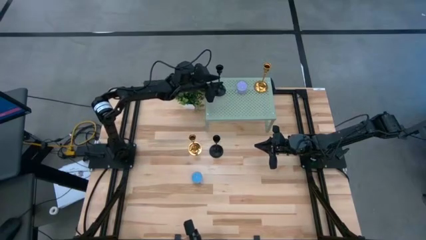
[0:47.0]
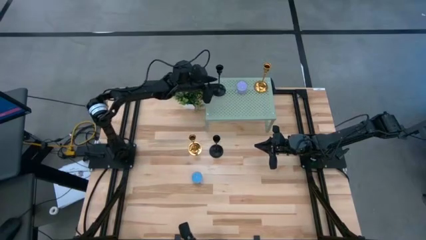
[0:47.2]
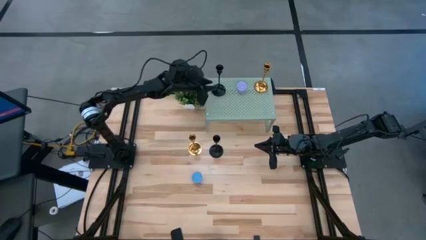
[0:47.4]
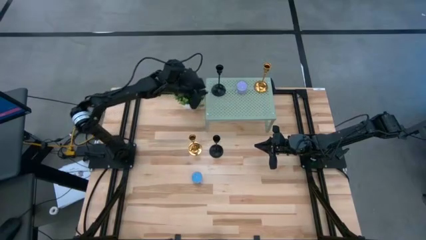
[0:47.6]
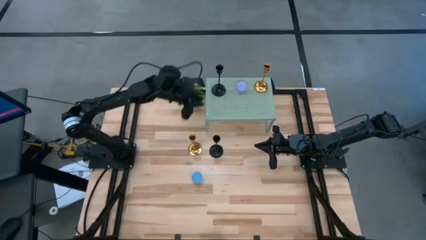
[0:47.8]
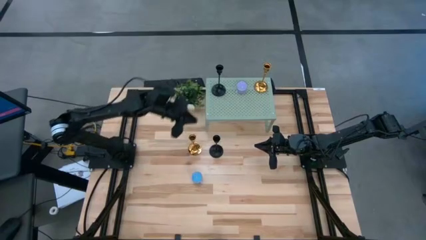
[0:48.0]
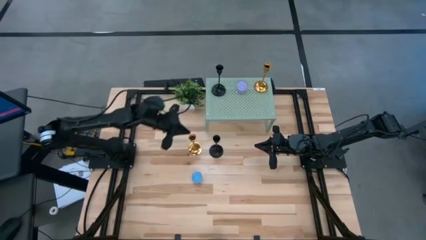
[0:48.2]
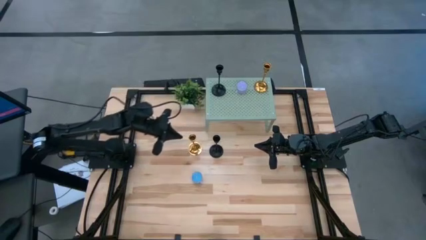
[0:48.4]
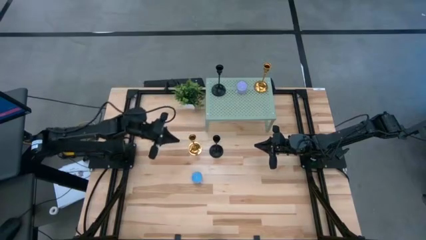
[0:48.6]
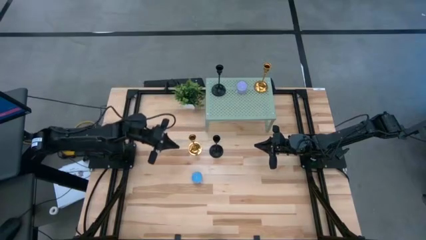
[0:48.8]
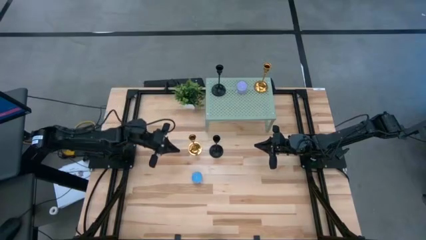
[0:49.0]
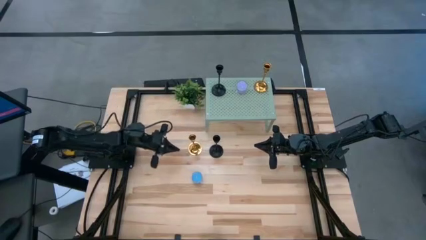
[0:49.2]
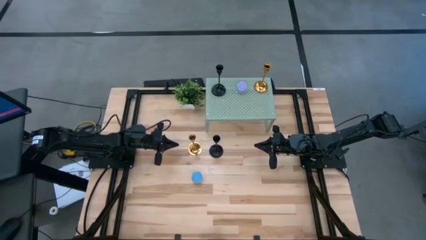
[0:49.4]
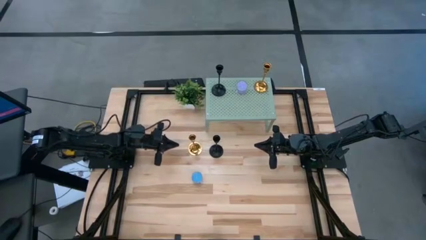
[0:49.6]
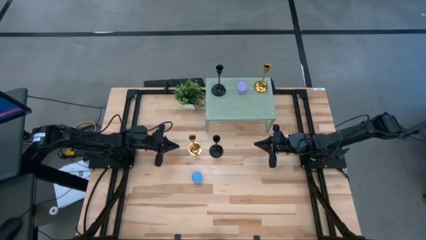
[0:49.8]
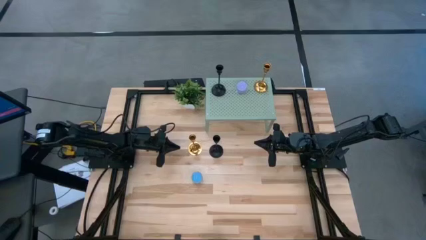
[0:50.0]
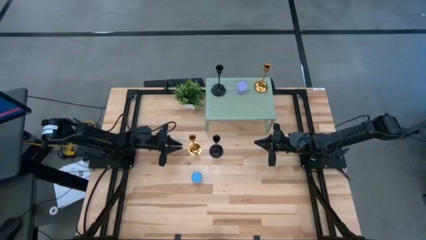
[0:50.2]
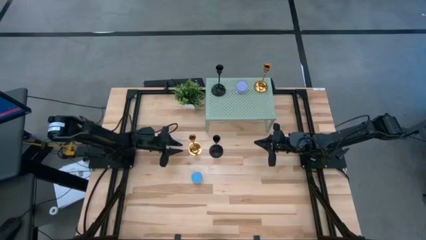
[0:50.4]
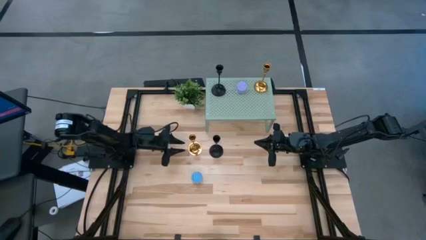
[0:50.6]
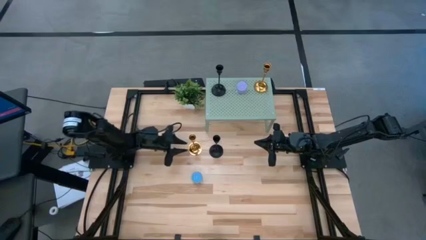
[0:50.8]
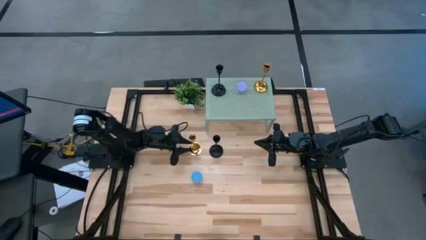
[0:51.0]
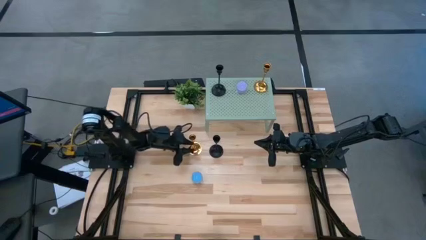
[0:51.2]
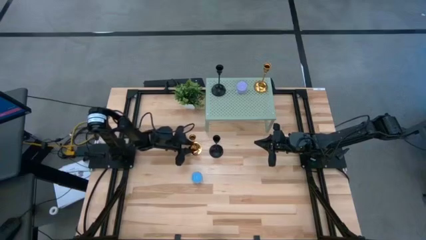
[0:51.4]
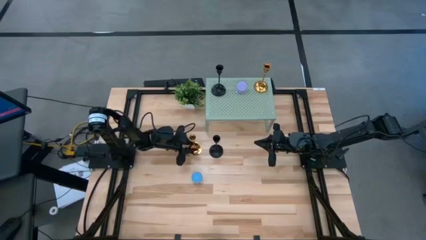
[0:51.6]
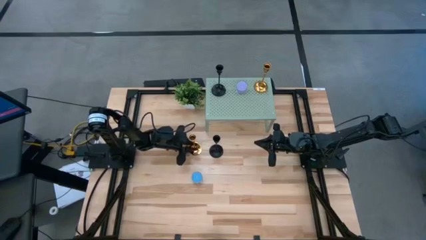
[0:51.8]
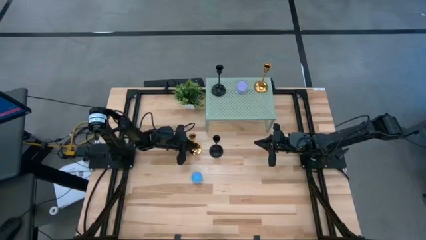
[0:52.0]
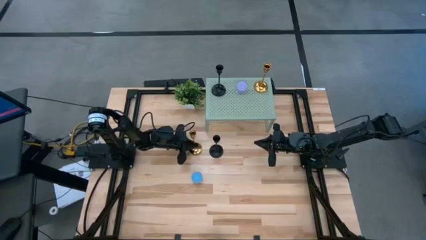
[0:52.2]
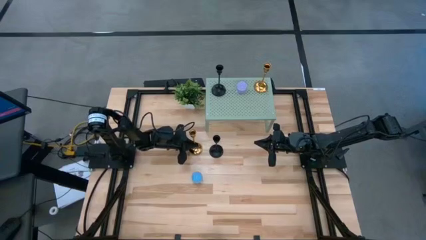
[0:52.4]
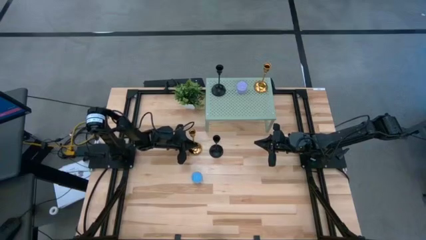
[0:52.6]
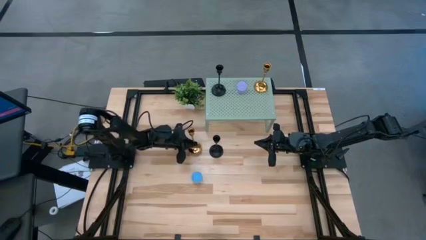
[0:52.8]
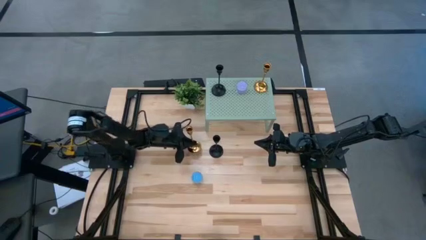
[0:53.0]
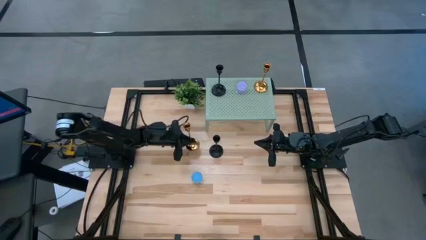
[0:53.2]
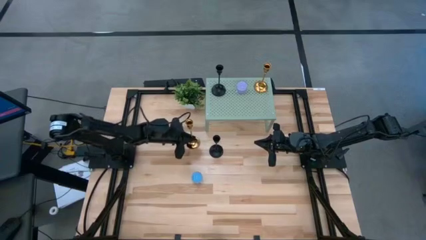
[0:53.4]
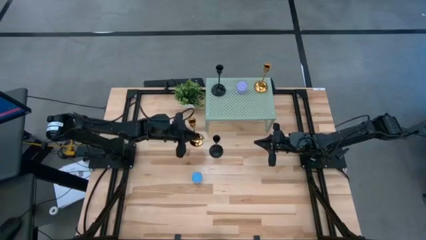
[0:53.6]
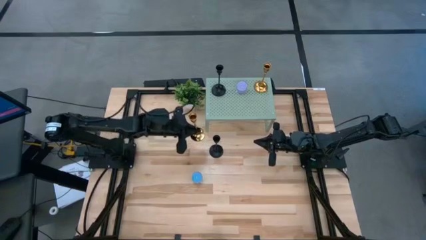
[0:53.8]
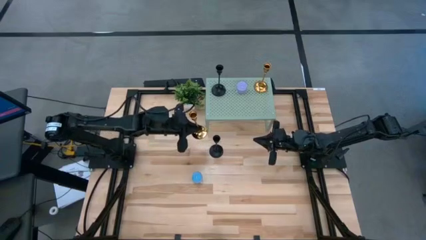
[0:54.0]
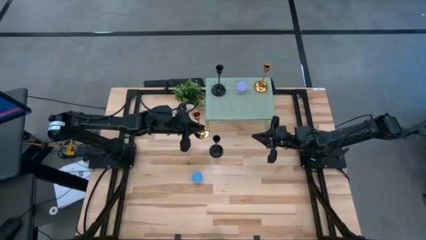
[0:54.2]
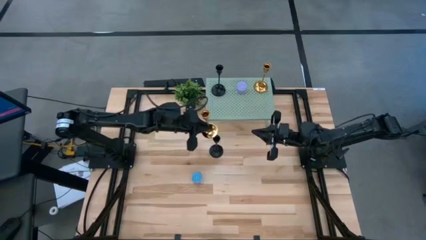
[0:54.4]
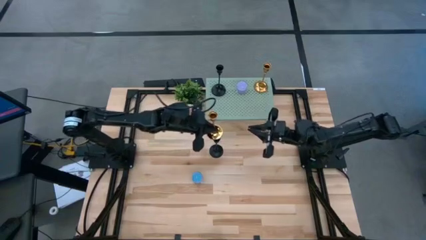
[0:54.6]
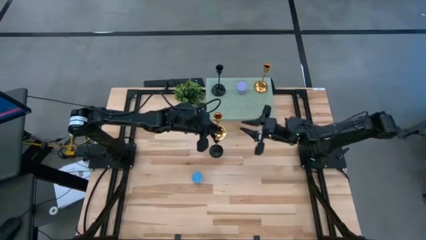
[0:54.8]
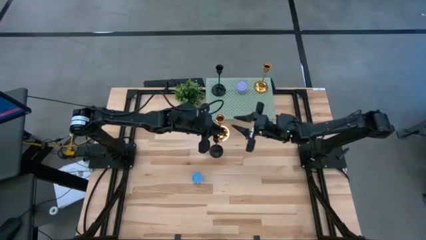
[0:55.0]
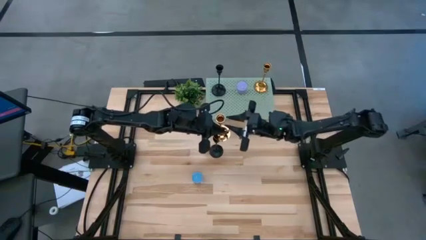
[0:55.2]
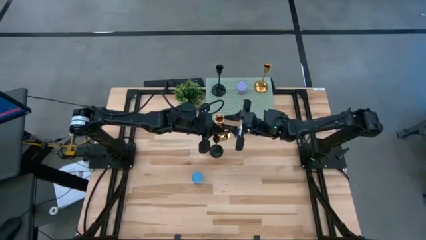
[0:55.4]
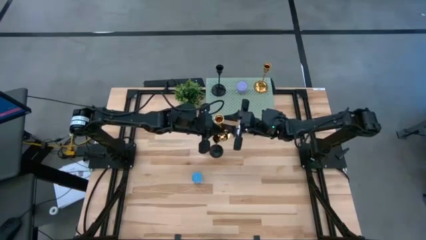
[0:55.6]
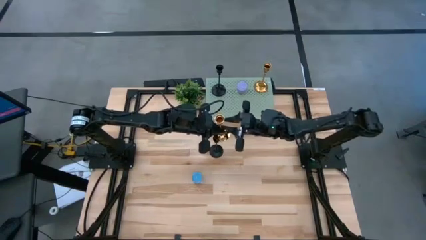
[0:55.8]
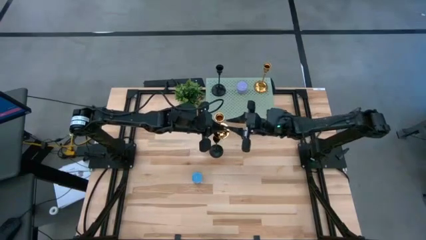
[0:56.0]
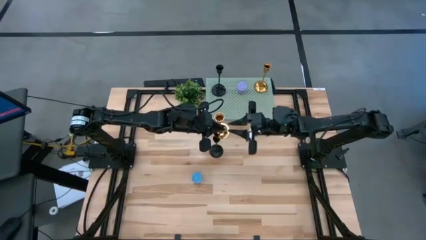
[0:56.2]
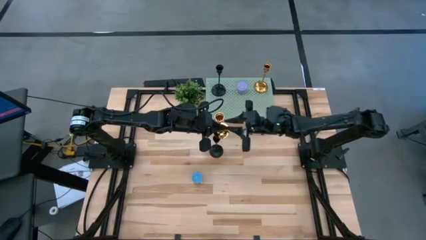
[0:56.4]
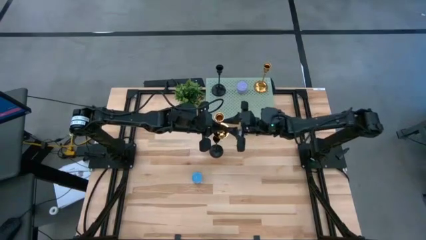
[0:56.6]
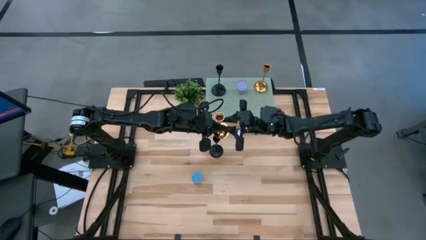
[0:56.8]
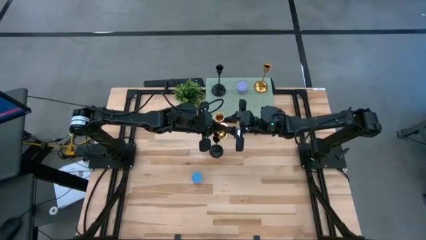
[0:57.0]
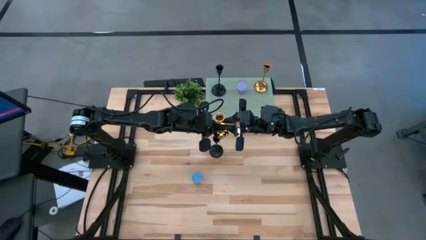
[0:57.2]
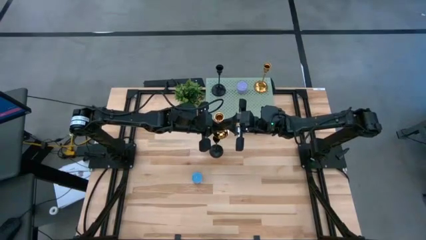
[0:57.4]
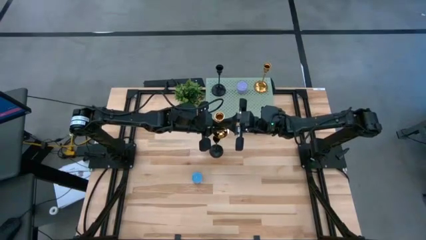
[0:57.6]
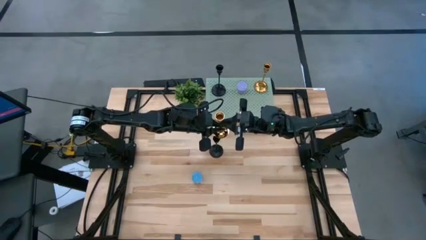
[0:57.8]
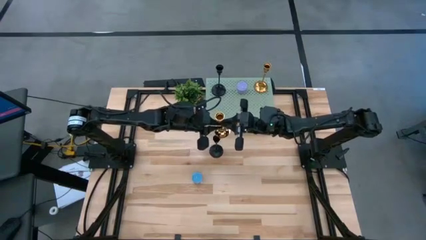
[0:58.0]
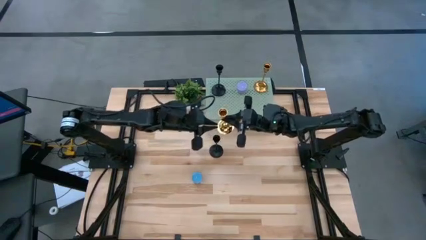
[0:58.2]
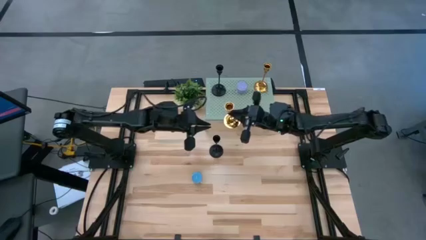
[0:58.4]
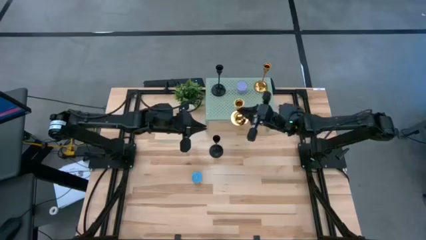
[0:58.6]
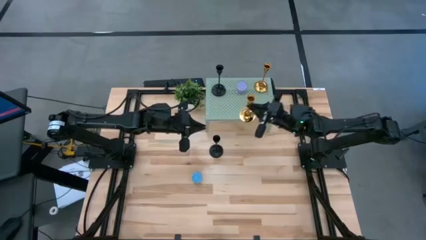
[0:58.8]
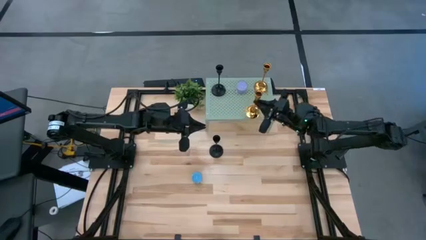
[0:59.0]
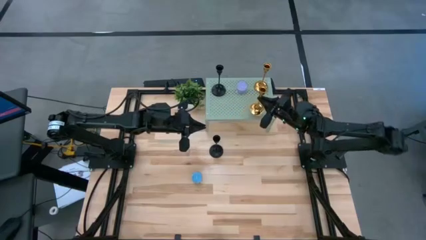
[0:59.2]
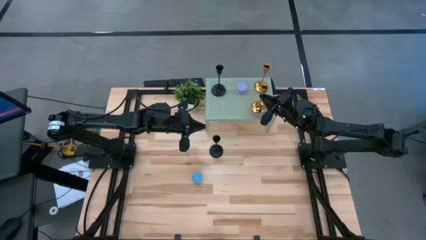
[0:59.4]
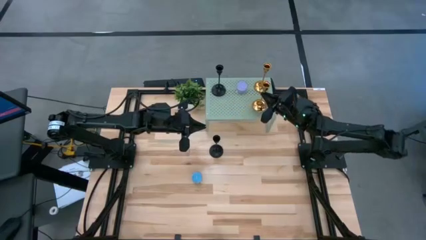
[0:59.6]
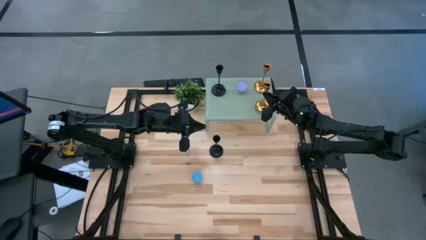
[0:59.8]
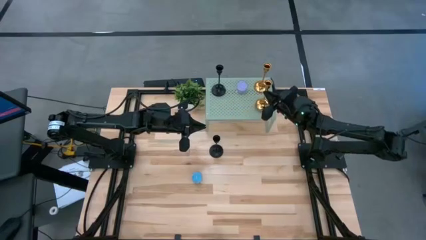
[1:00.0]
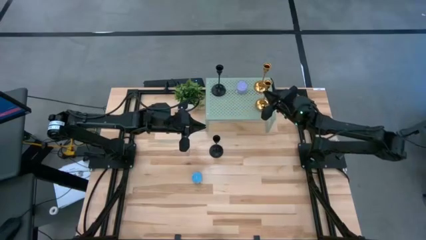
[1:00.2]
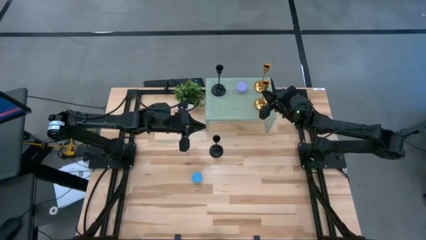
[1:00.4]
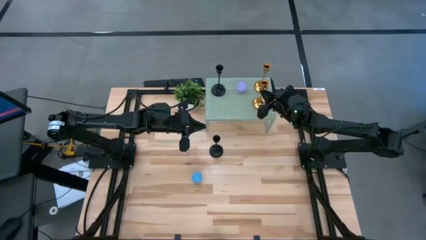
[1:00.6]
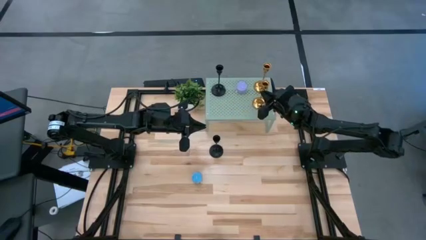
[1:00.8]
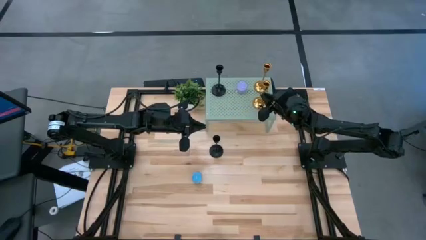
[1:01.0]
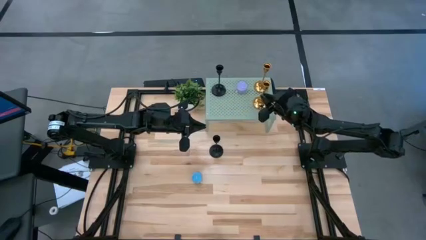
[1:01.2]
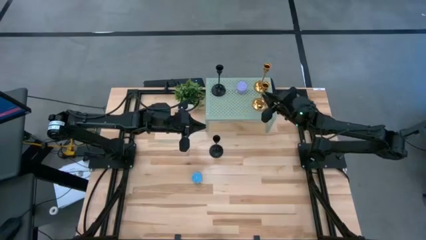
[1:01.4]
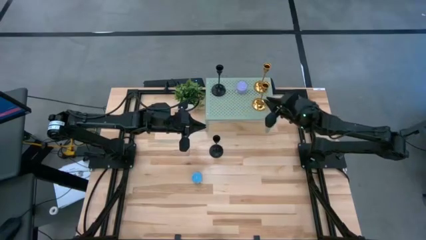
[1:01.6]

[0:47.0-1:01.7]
Task: Pick & Place candle stick holders
Align the golden candle holder with the other golden candle holder on the shelf
